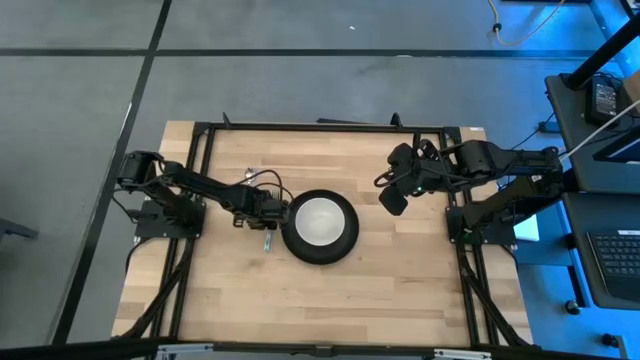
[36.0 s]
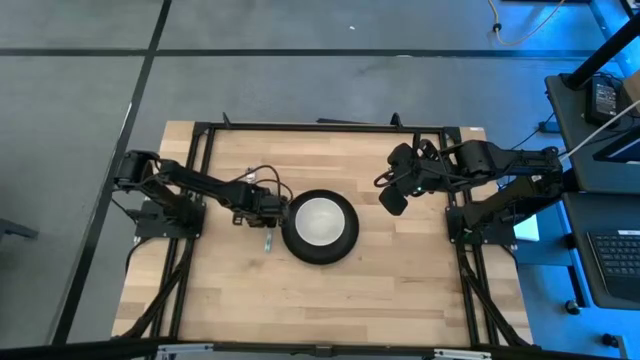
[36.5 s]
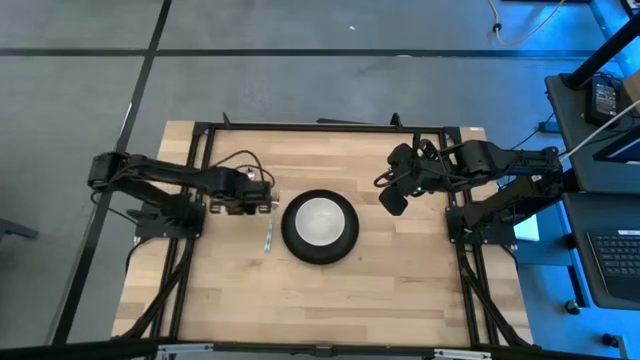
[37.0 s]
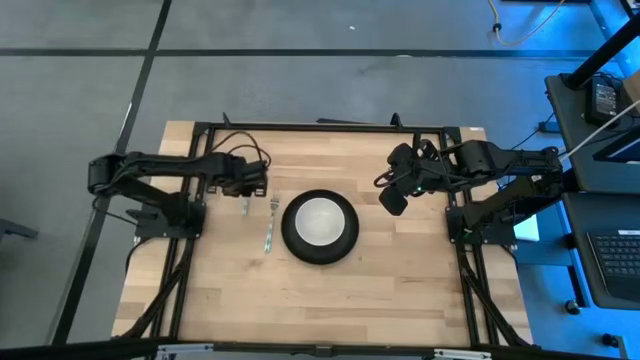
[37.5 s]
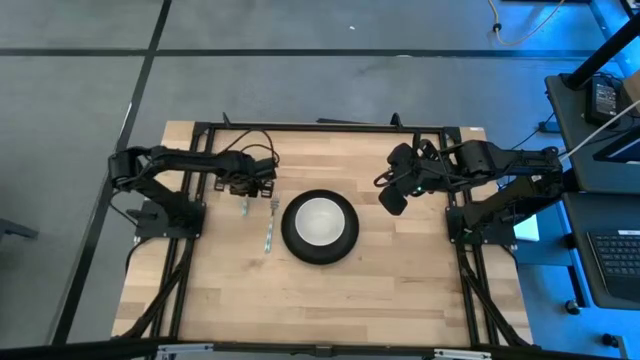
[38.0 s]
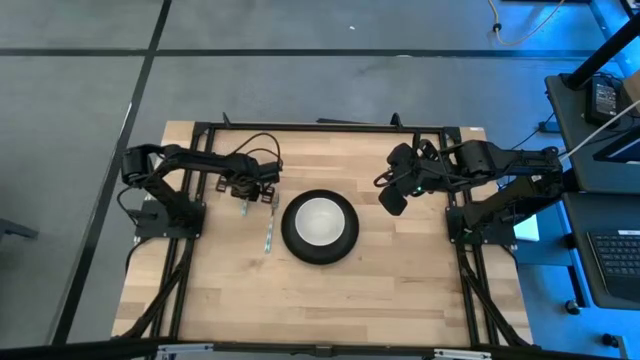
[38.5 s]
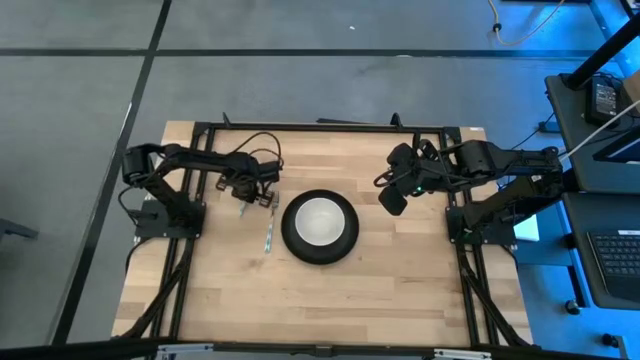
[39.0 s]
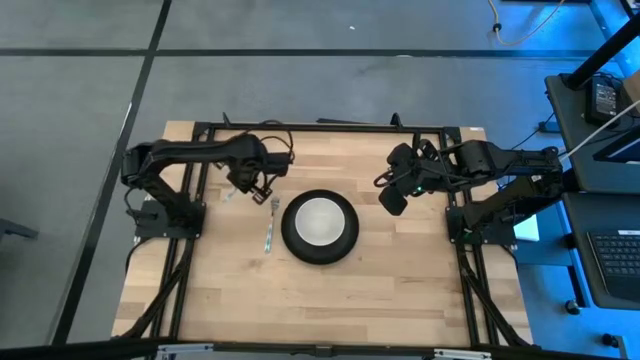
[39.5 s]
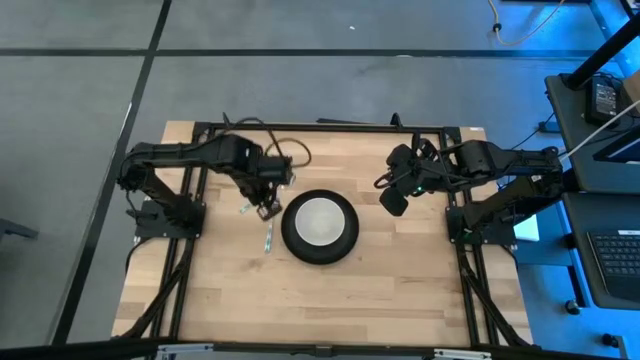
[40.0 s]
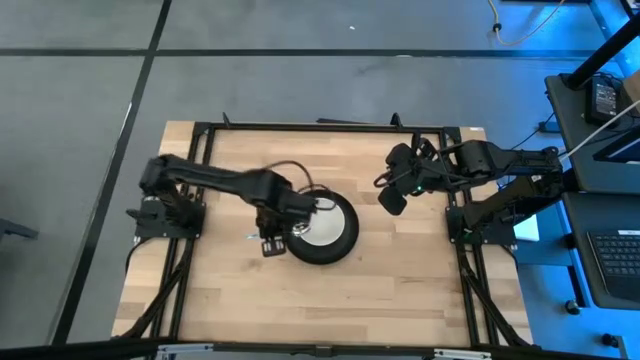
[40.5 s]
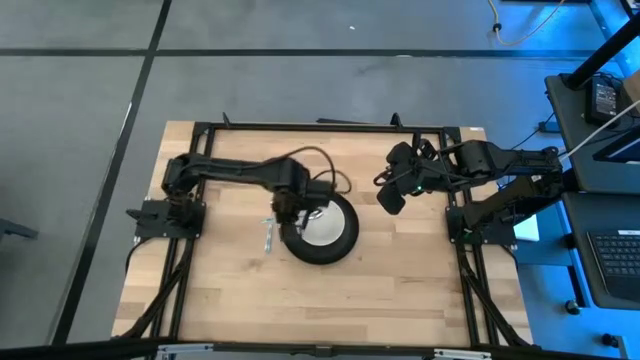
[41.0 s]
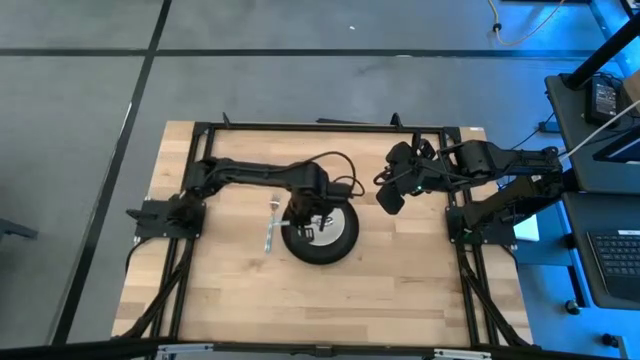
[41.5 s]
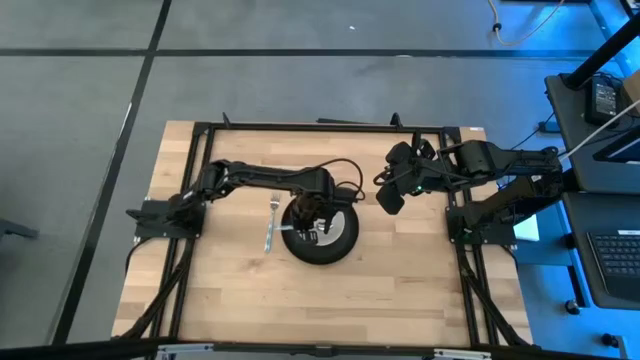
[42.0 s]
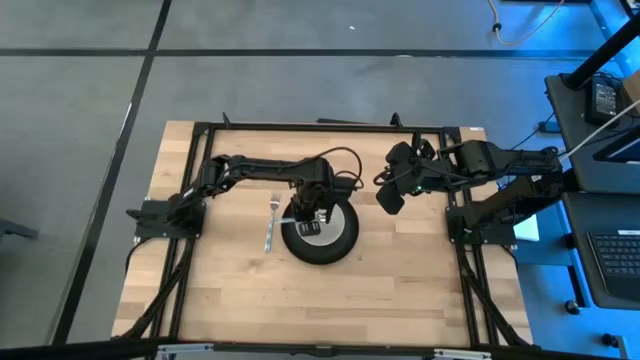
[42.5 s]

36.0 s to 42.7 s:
Task: Set table place
Put the spoon into the bowl

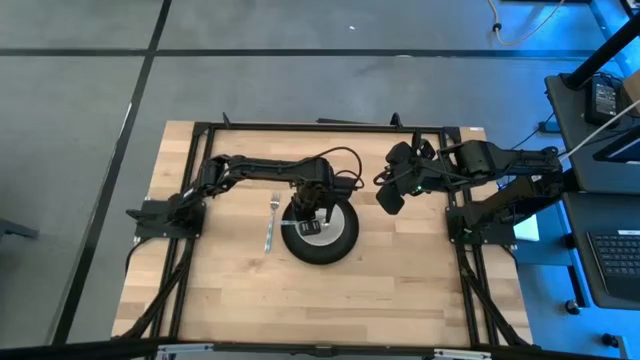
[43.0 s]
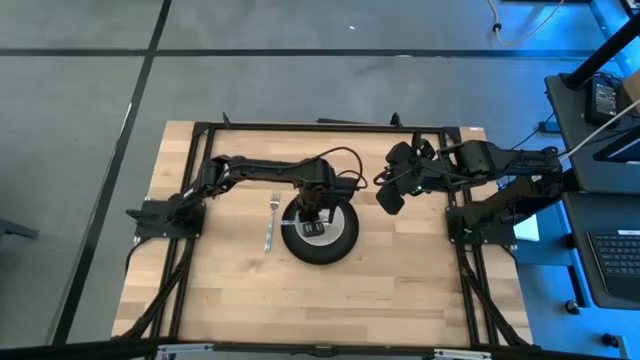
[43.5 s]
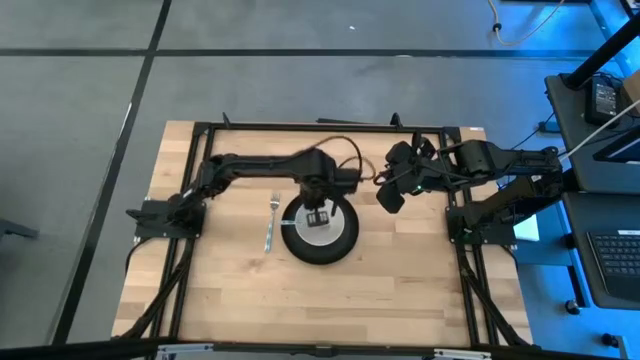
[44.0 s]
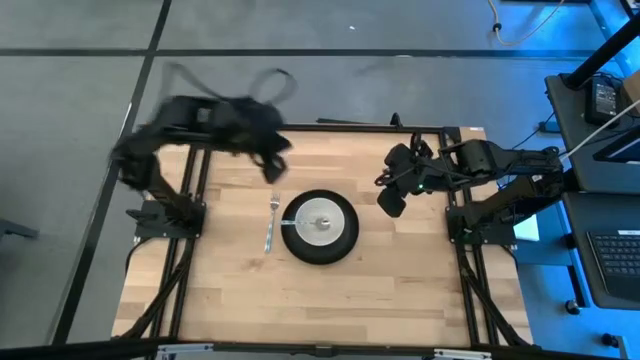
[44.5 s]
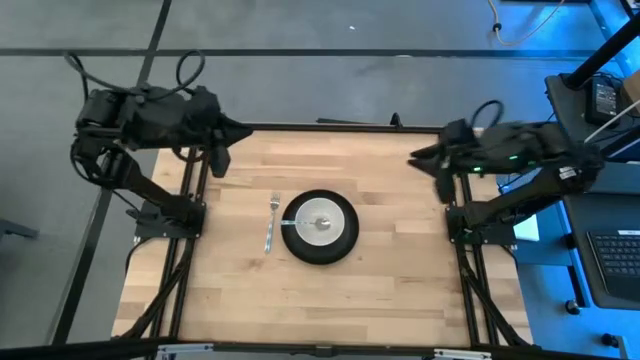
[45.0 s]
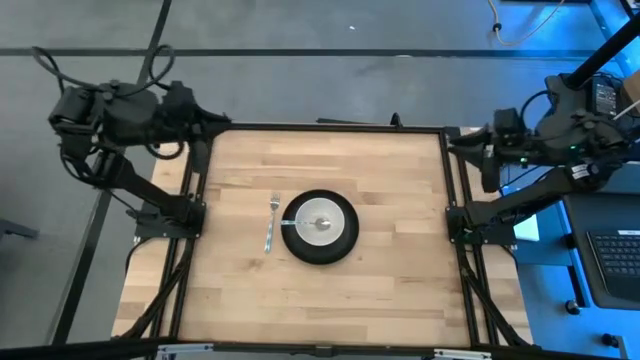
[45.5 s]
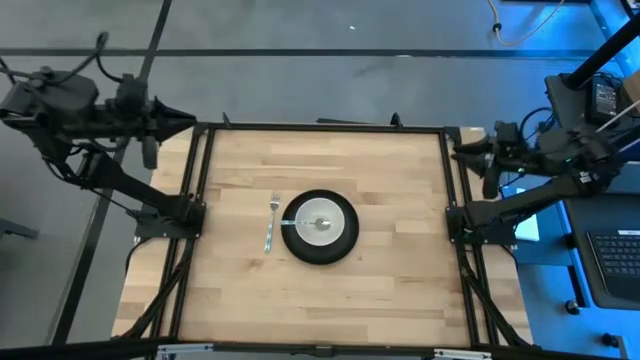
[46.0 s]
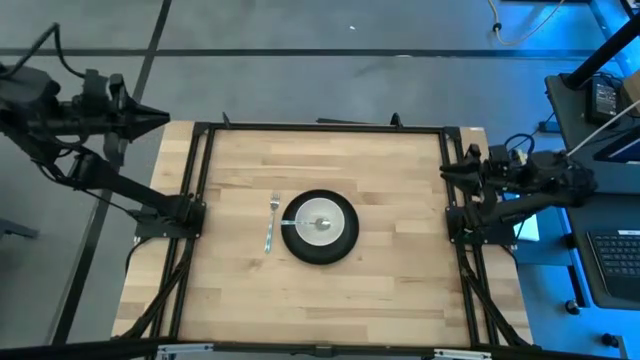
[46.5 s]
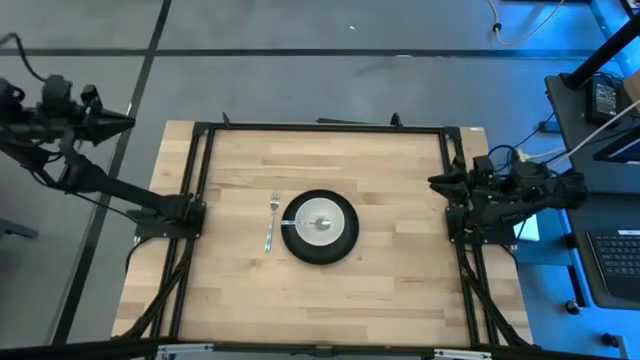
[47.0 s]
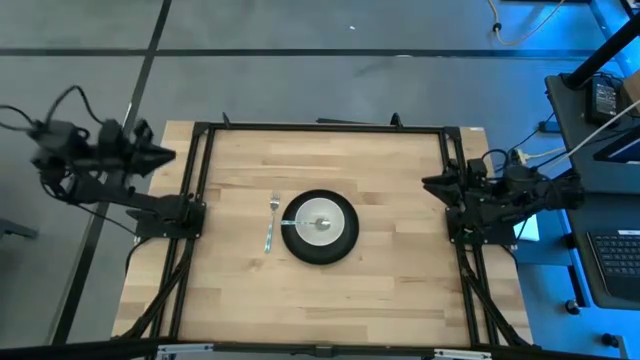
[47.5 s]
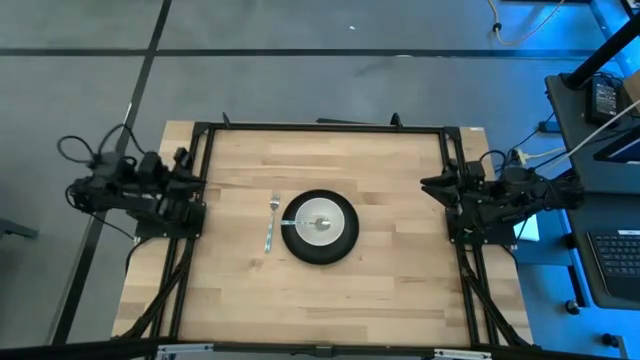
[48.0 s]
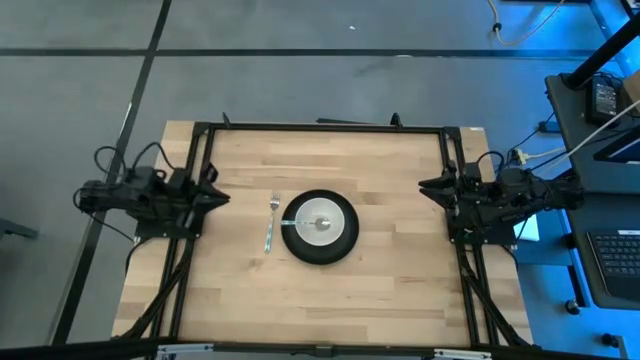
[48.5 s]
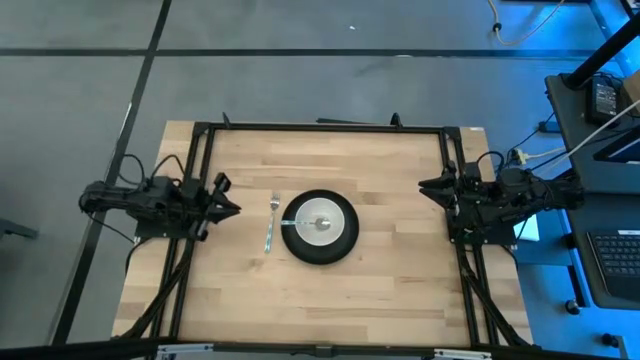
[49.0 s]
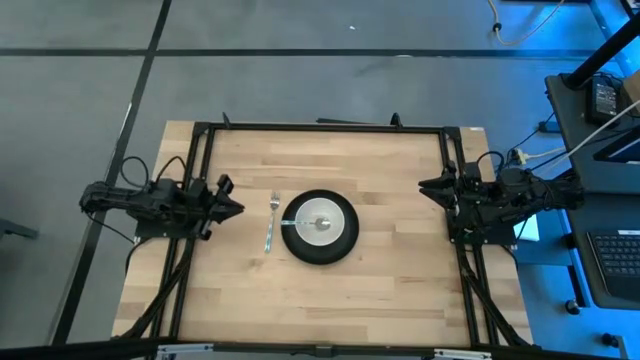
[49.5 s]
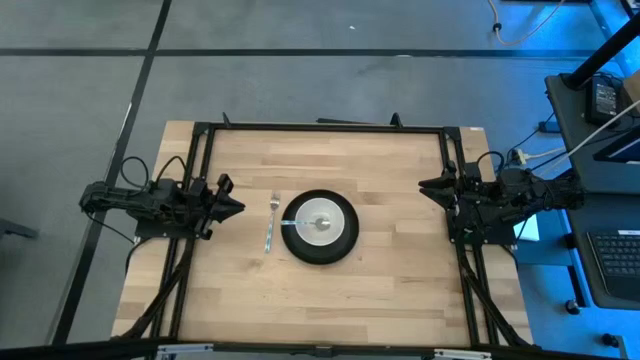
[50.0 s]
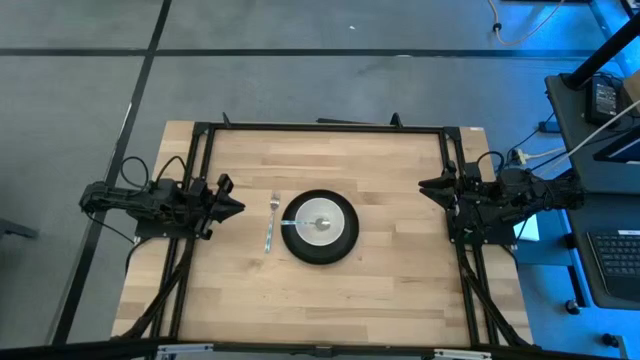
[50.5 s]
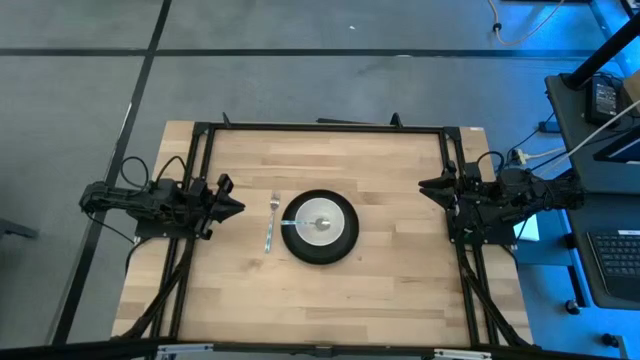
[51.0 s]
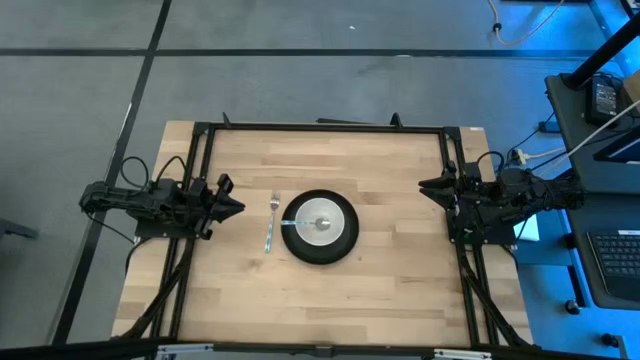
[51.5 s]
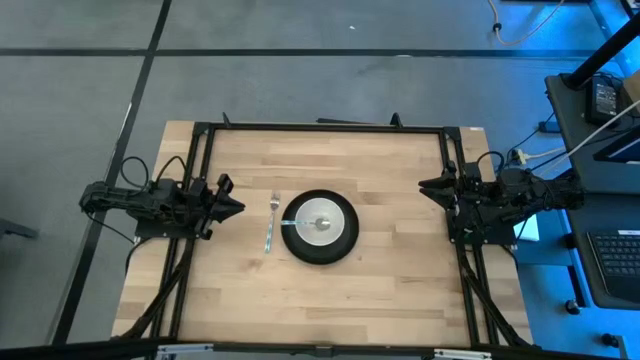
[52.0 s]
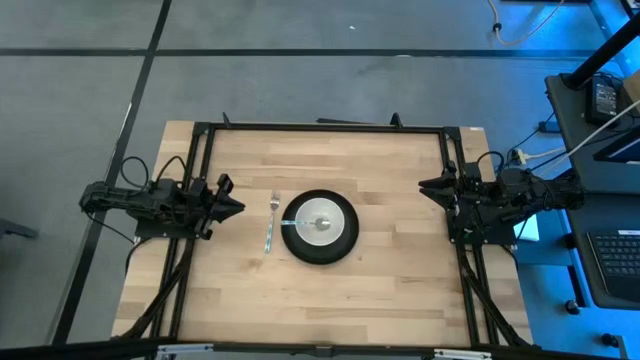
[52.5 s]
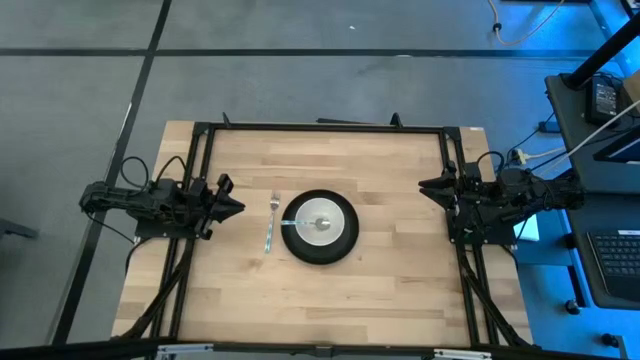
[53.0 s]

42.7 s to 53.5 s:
Return to Home Position

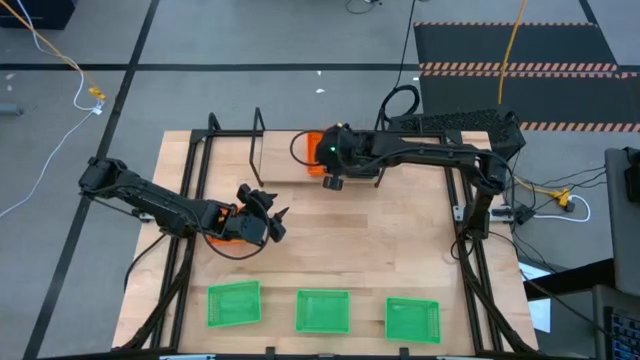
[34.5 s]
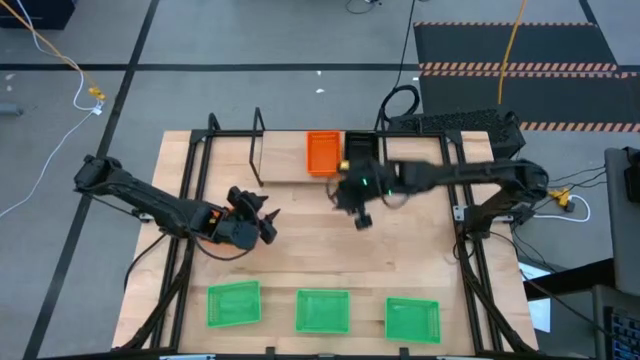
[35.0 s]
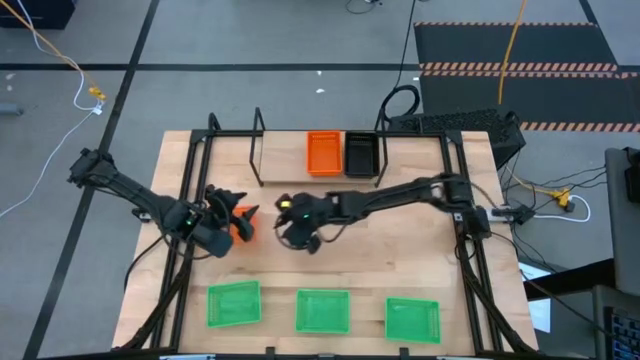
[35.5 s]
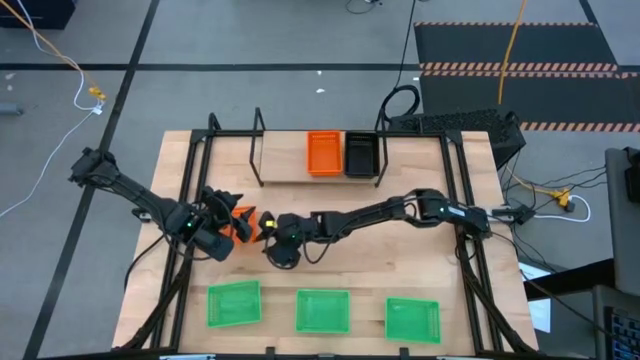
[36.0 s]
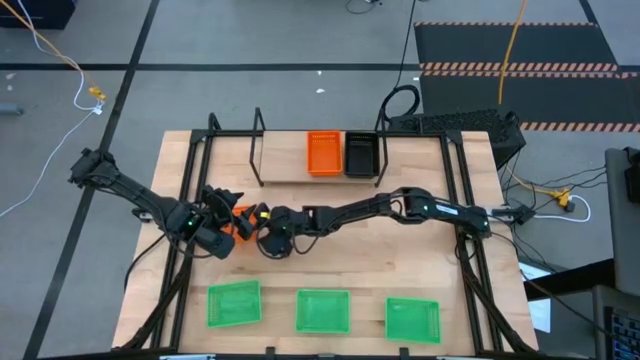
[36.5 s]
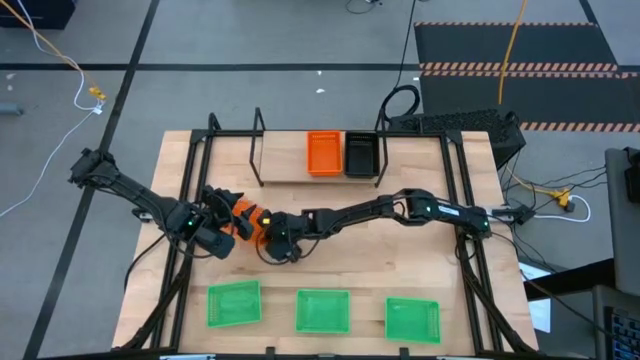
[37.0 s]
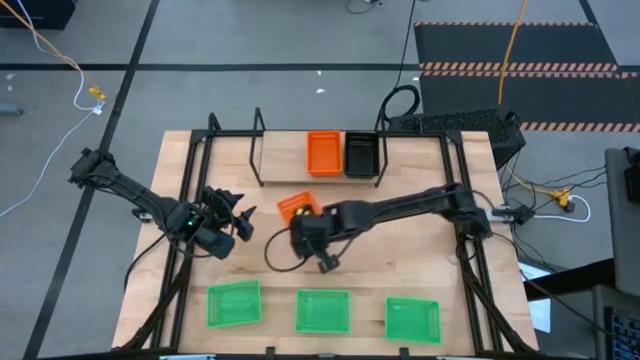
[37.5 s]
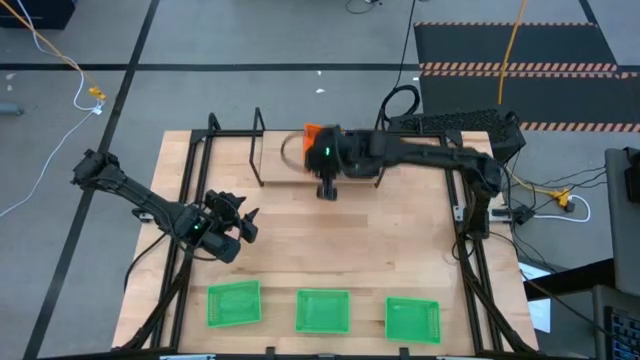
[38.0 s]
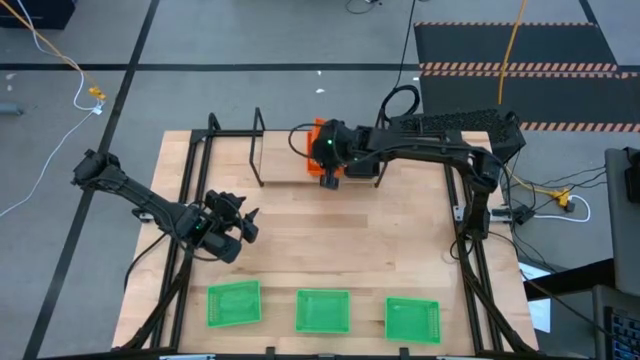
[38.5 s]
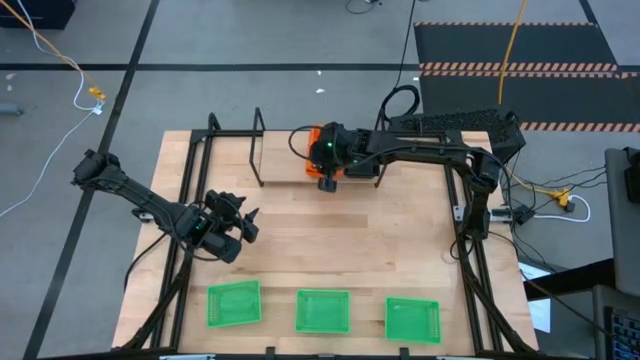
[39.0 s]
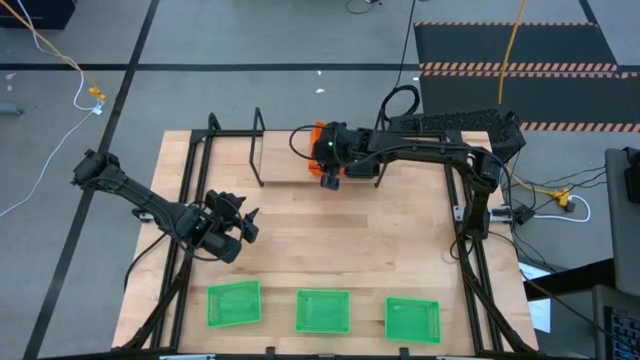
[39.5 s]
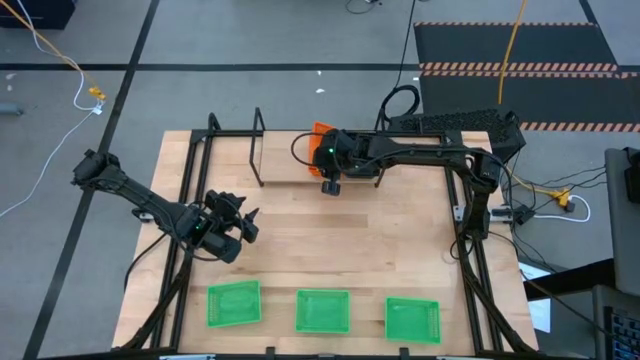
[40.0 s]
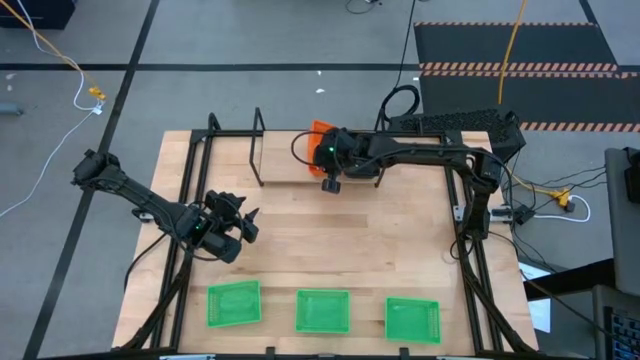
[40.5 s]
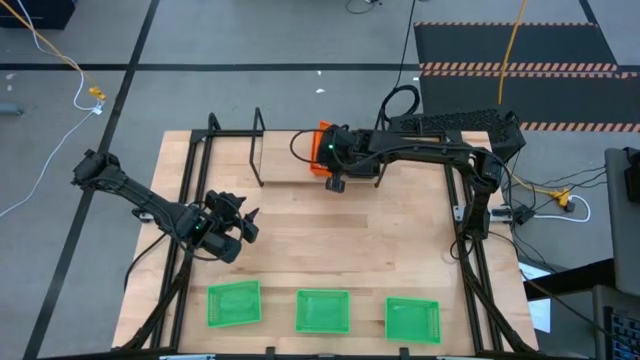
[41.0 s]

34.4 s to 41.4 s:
Task: Stack baskets on shelf by color
Stack the orange bin on top of the orange bin on the shelf
